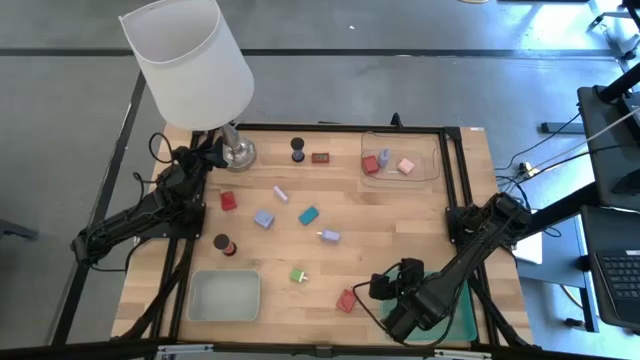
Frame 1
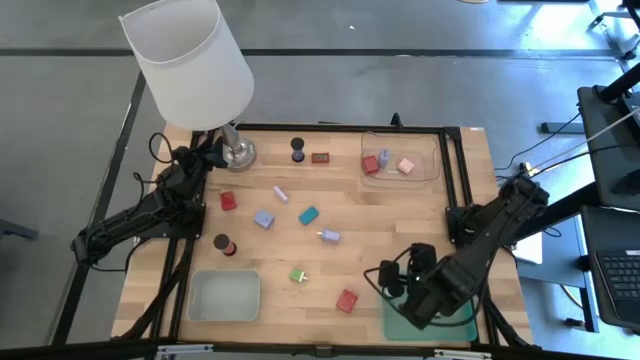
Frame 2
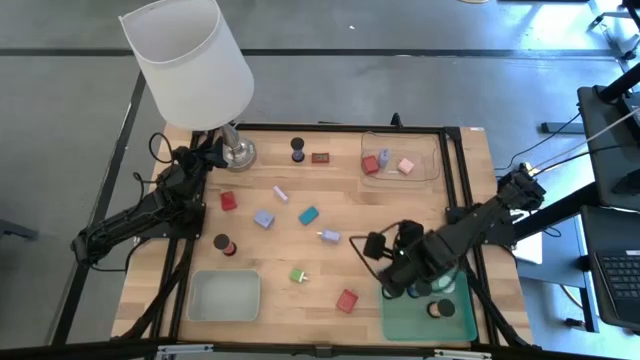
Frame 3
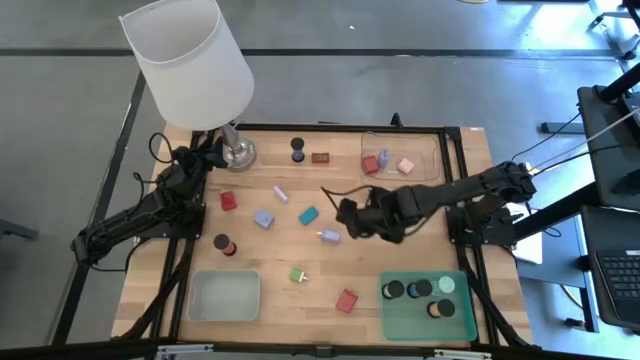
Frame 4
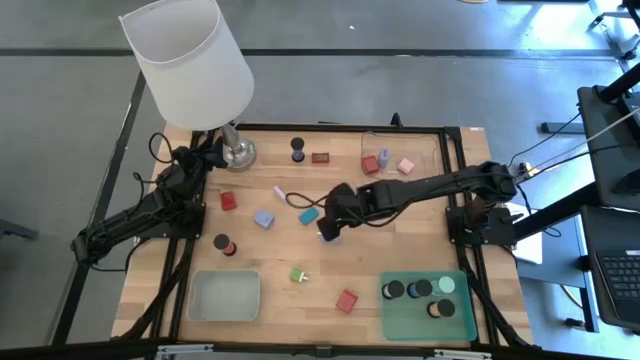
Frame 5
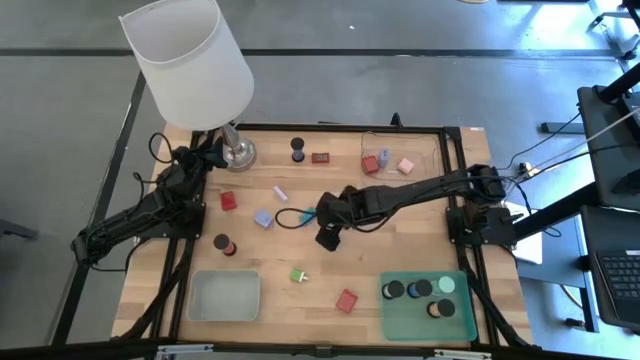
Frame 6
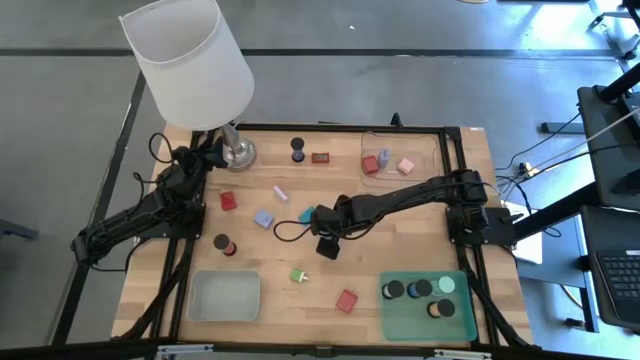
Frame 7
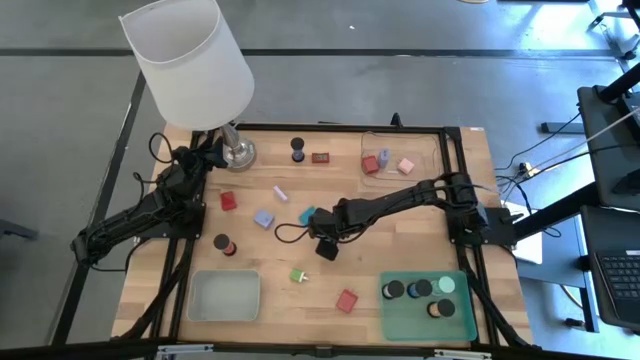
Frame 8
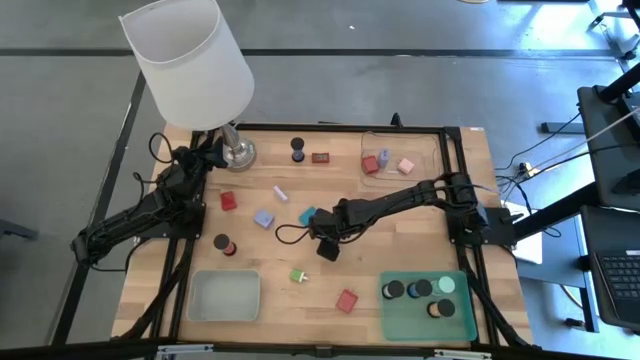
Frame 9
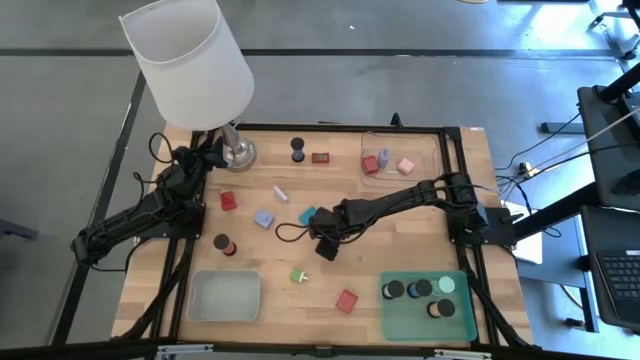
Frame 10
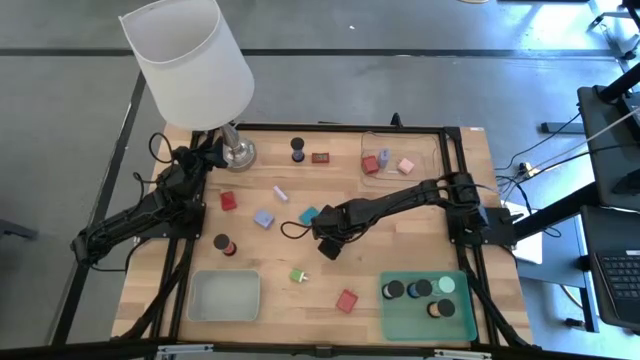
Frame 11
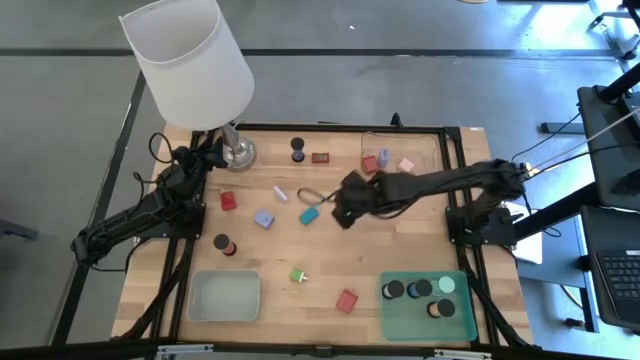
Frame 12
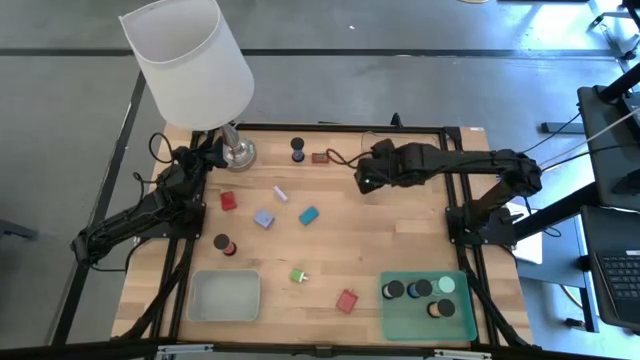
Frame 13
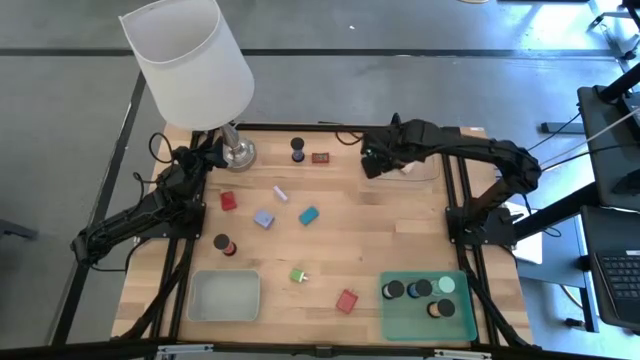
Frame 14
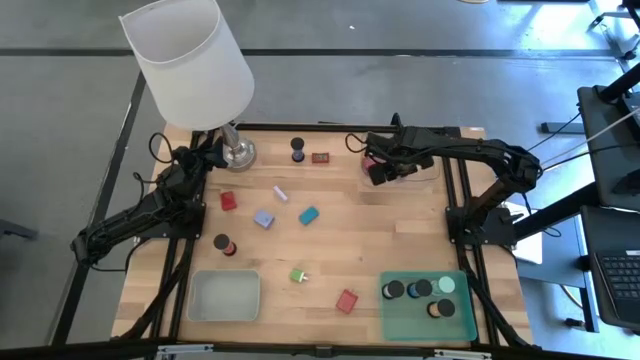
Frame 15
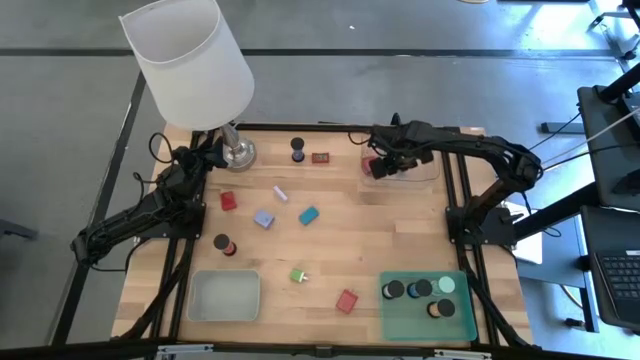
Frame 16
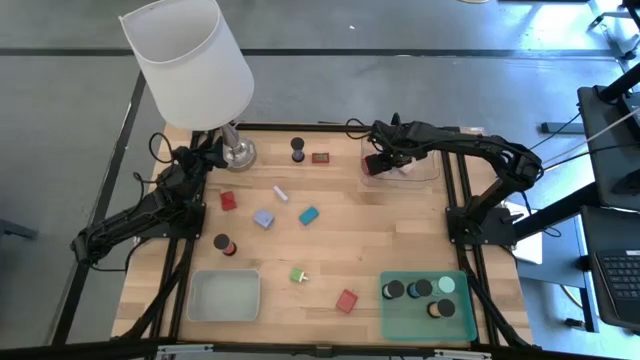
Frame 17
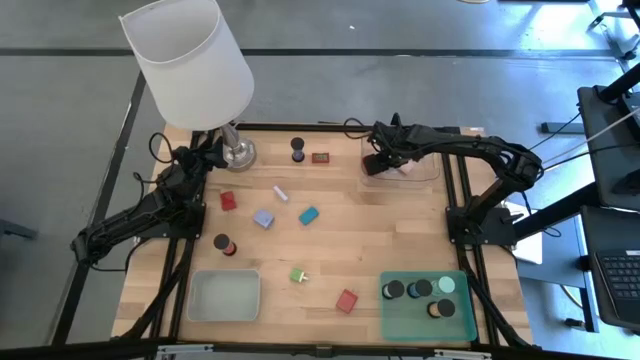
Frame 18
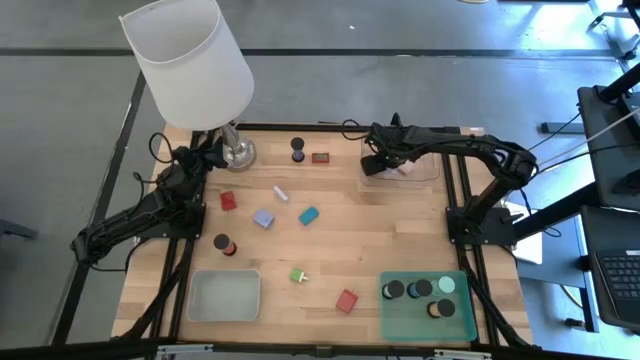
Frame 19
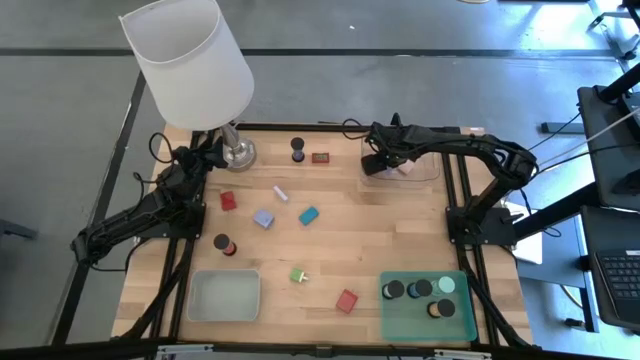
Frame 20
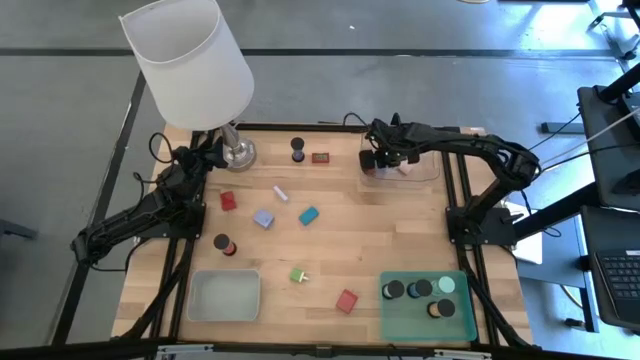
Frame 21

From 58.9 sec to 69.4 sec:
Task: Pick & Place Office items
Put the right blue charger adapter into the transparent bin

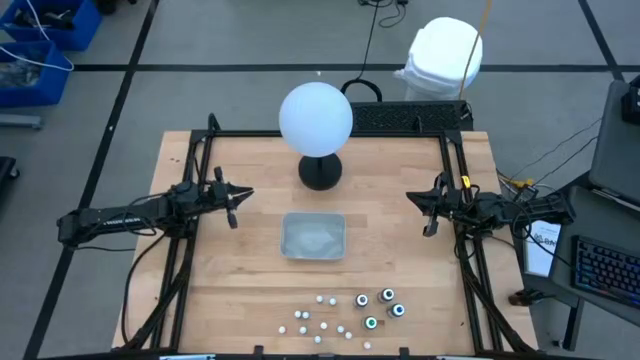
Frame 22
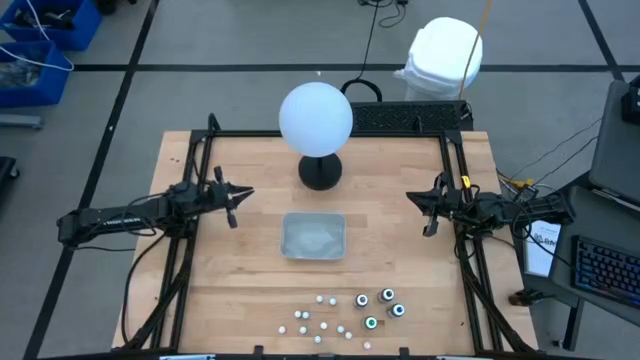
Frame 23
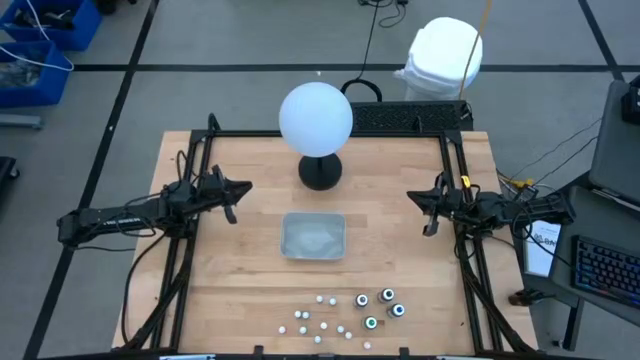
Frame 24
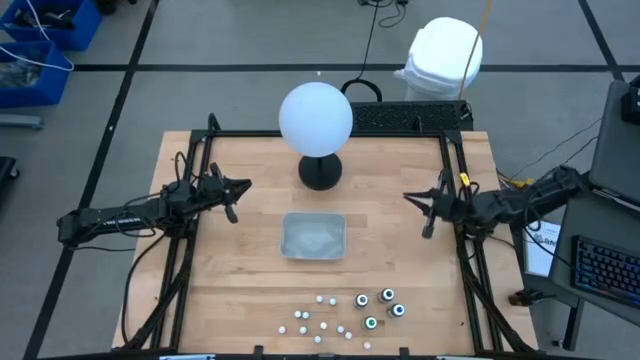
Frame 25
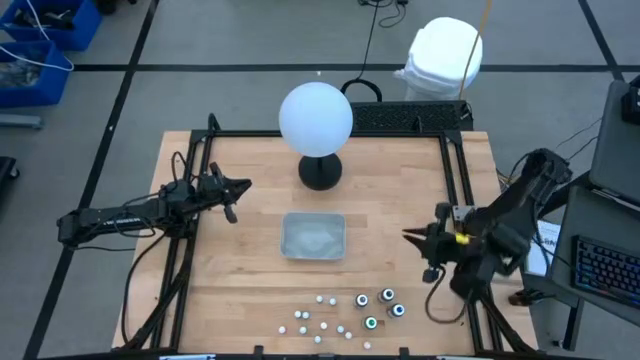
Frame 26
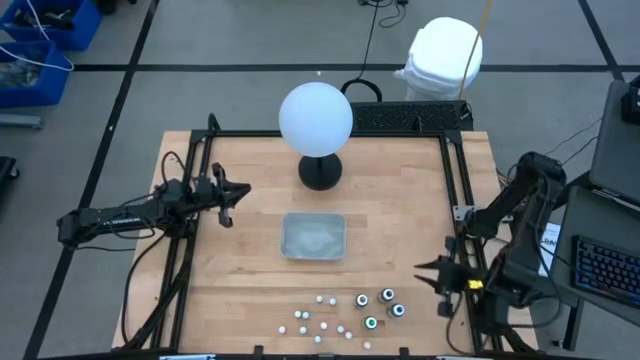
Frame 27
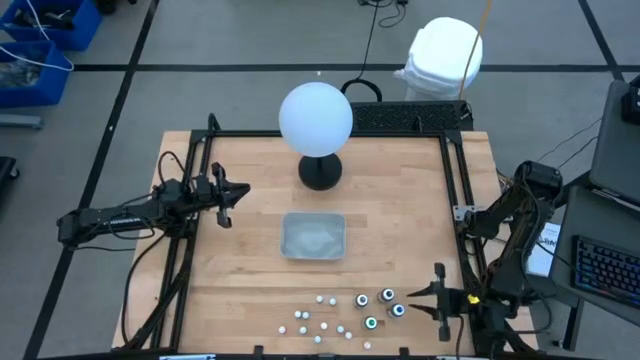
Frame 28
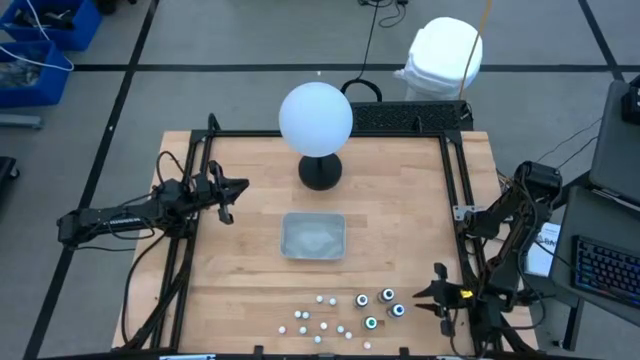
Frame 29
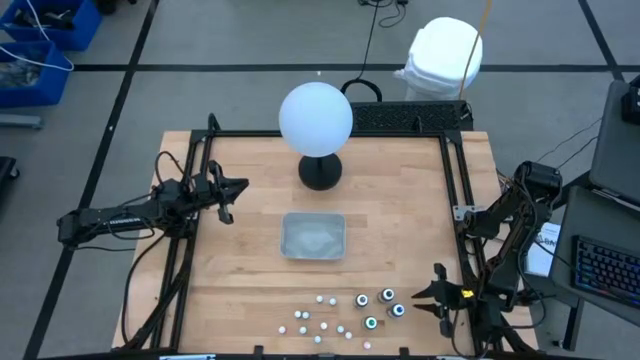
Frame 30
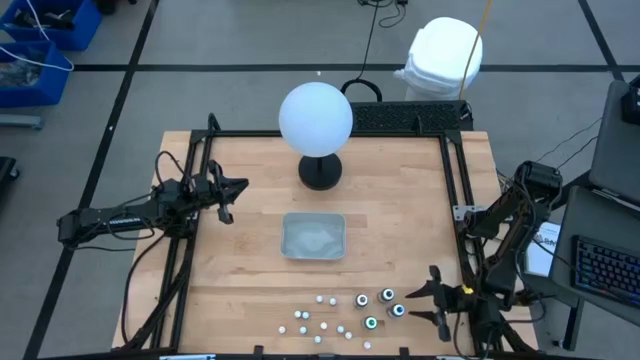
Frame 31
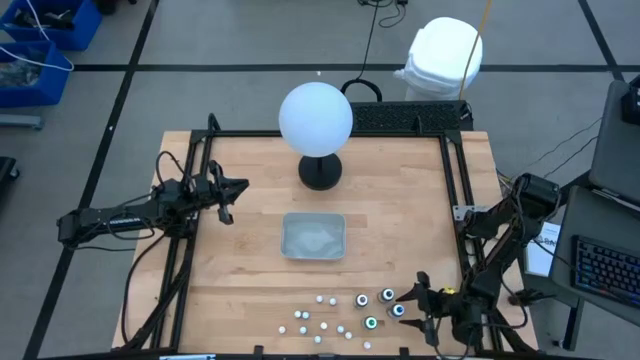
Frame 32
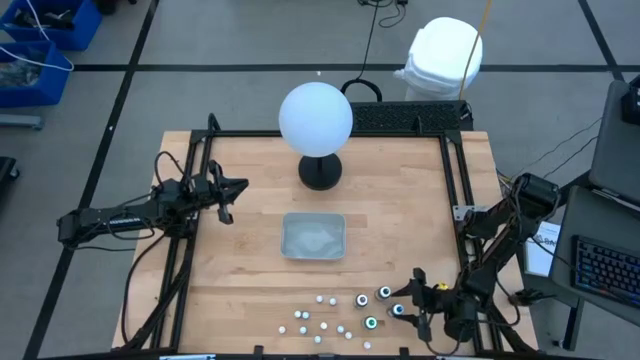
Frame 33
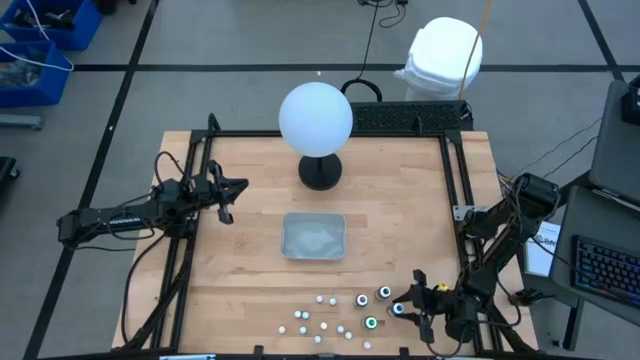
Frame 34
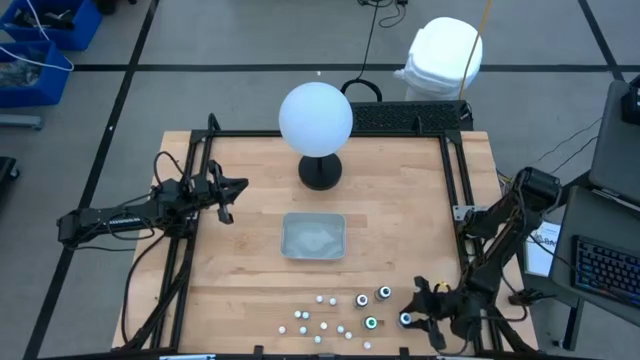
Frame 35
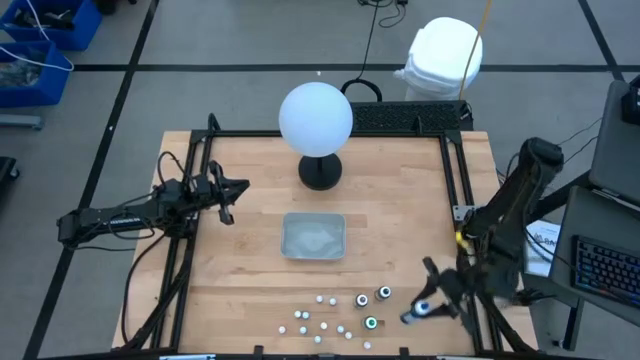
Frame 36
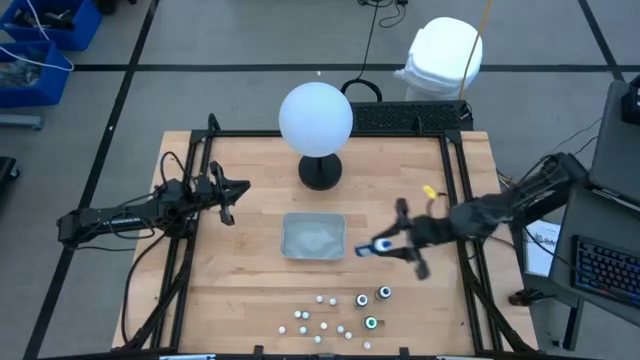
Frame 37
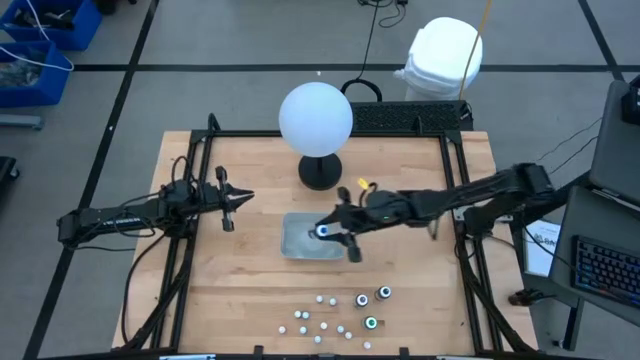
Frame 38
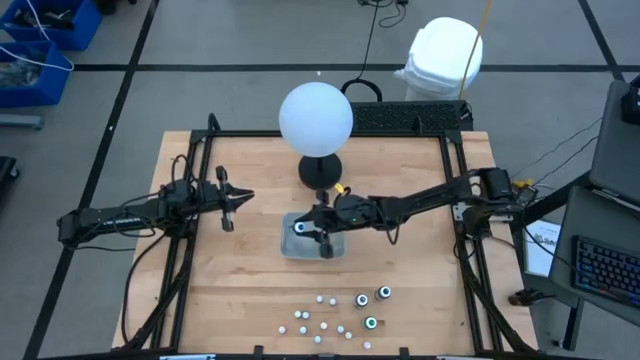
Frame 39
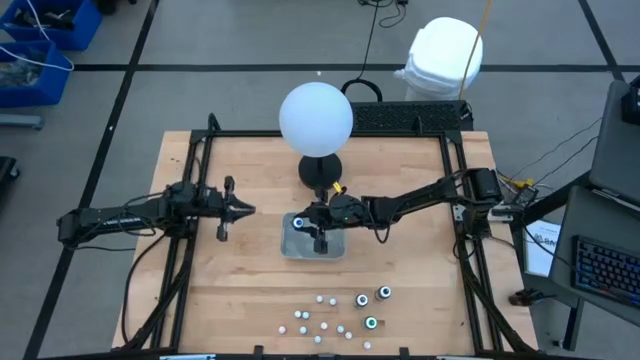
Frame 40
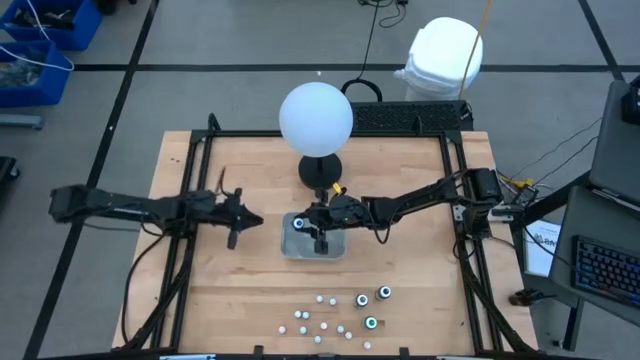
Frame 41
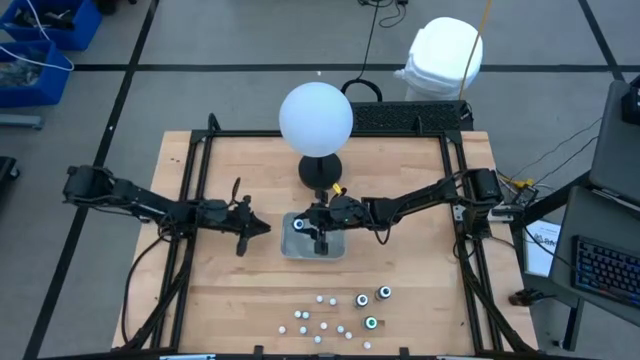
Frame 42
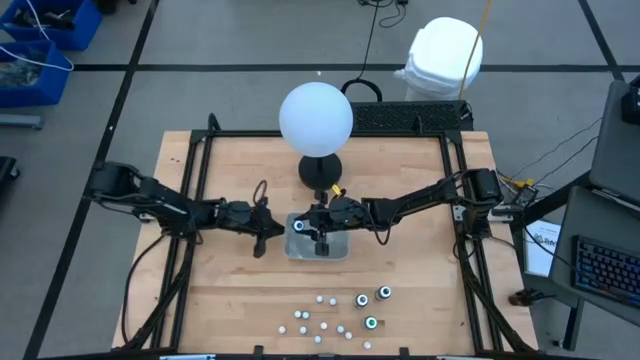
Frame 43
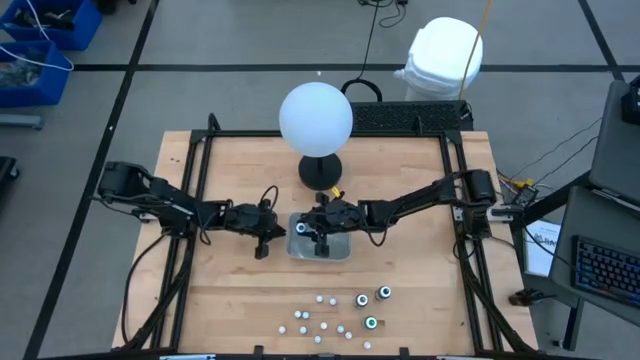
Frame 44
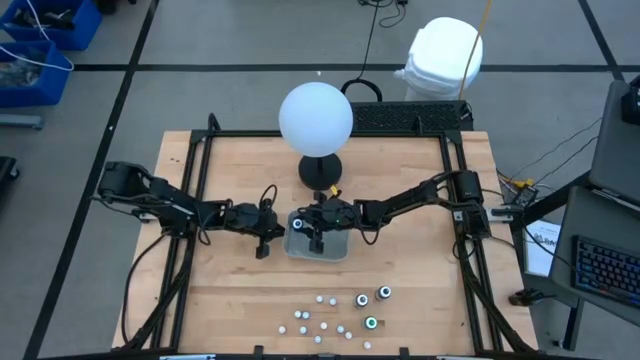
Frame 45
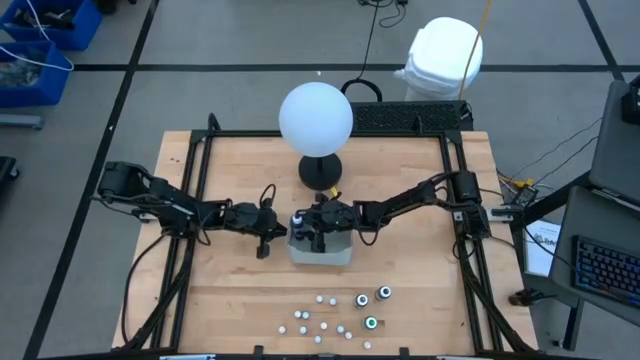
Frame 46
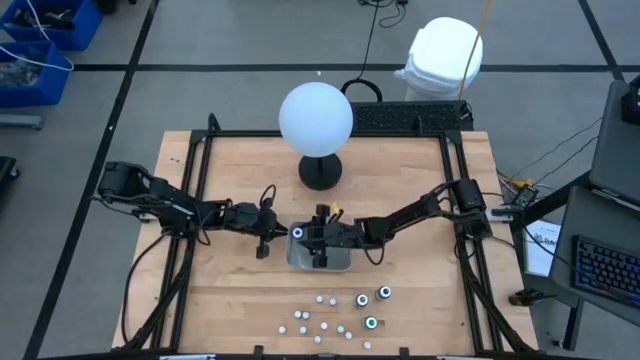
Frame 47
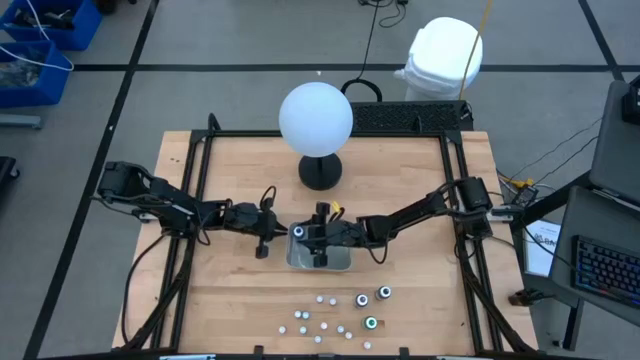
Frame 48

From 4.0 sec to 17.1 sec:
Task: Pick & Place food coloring
Put the large blue food coloring bottle into the gray bin
